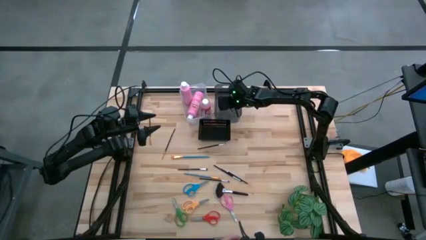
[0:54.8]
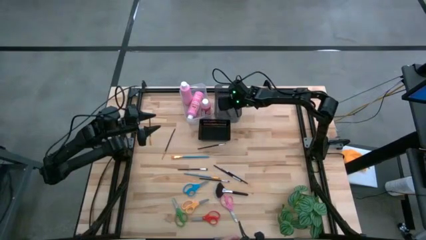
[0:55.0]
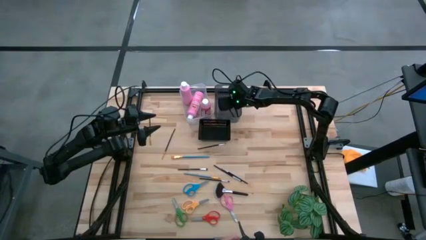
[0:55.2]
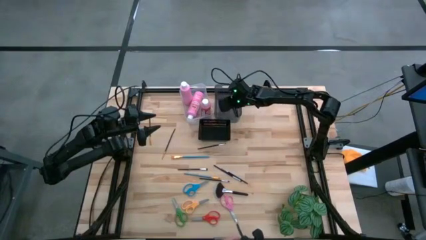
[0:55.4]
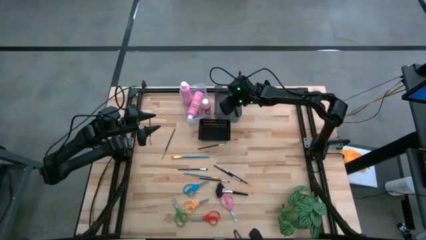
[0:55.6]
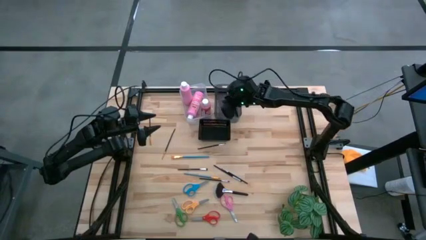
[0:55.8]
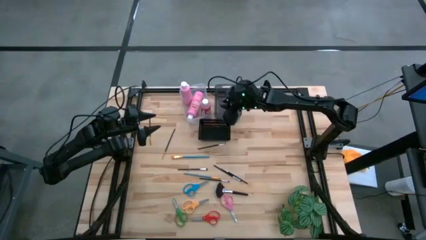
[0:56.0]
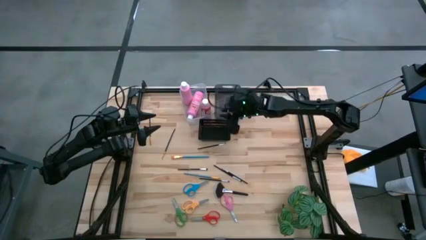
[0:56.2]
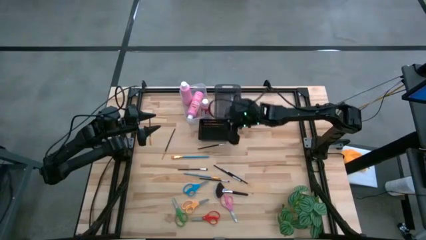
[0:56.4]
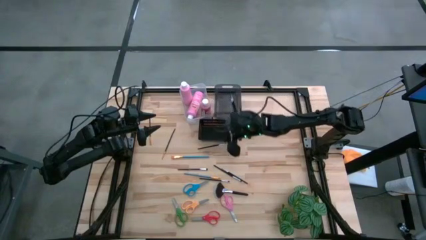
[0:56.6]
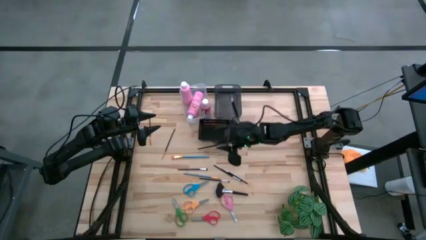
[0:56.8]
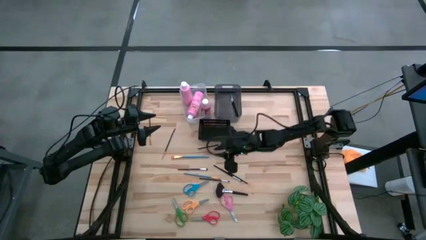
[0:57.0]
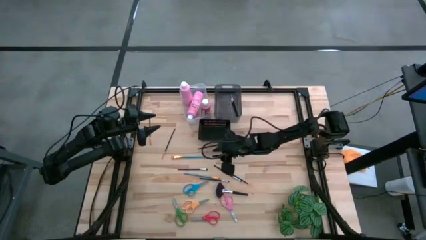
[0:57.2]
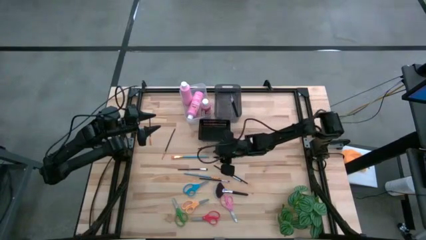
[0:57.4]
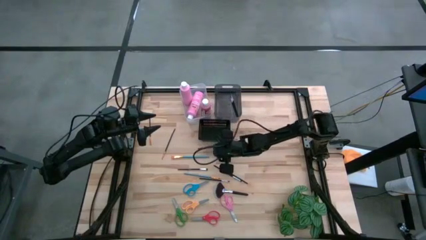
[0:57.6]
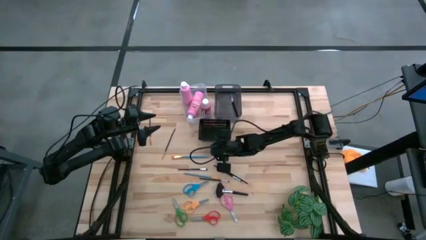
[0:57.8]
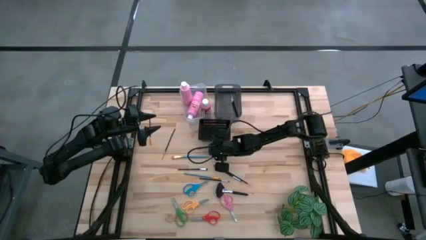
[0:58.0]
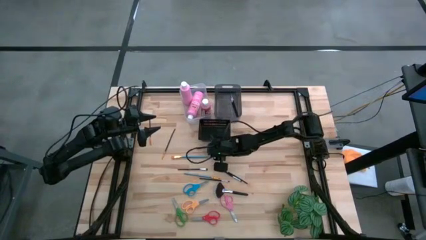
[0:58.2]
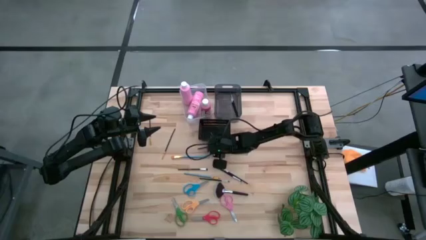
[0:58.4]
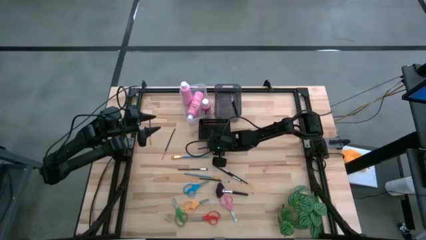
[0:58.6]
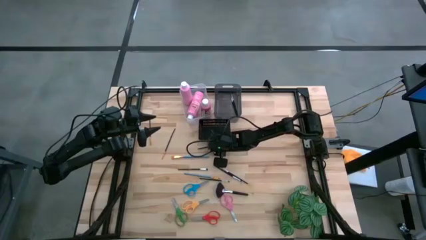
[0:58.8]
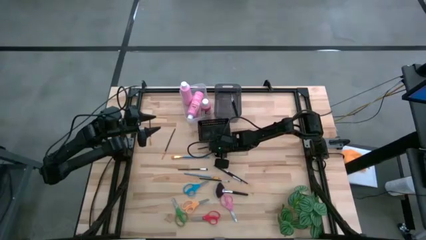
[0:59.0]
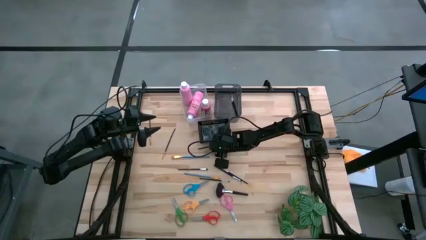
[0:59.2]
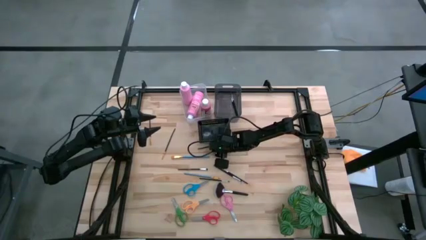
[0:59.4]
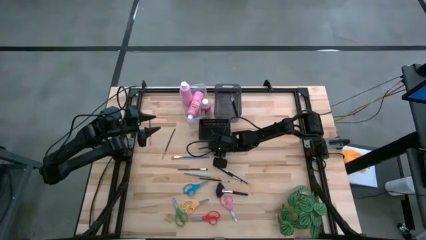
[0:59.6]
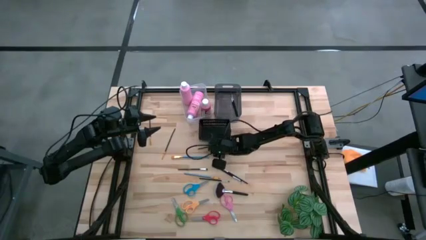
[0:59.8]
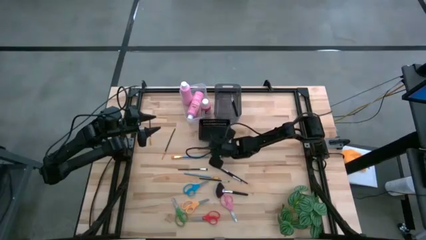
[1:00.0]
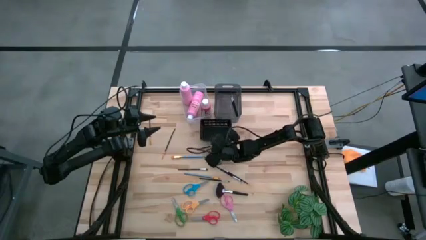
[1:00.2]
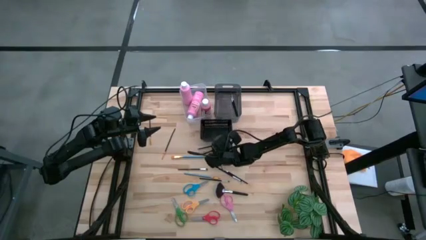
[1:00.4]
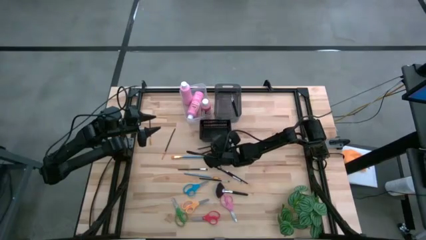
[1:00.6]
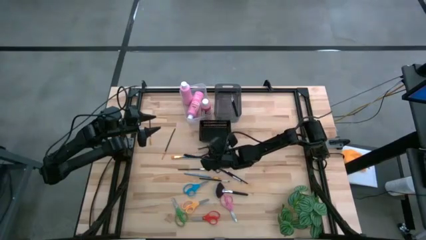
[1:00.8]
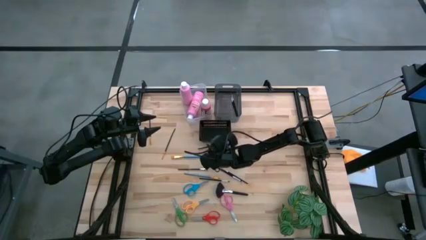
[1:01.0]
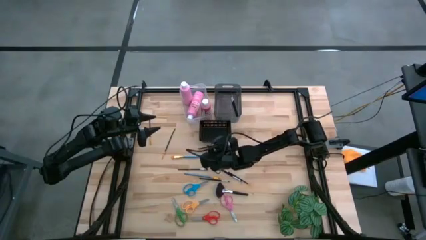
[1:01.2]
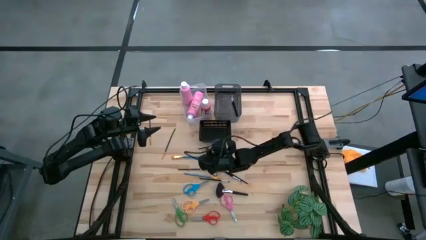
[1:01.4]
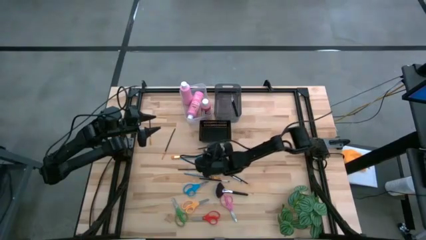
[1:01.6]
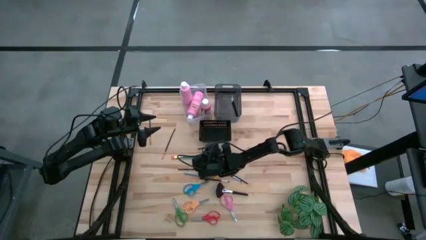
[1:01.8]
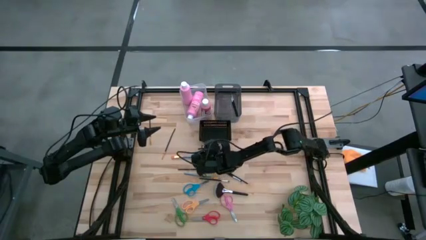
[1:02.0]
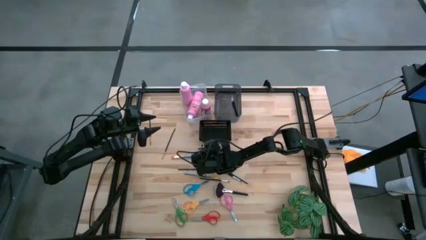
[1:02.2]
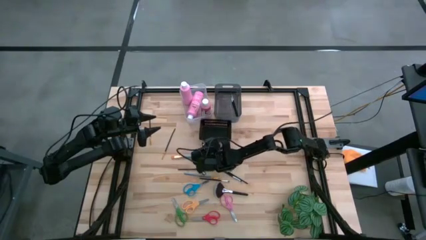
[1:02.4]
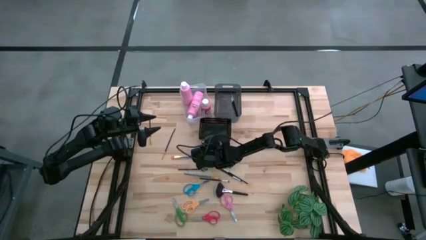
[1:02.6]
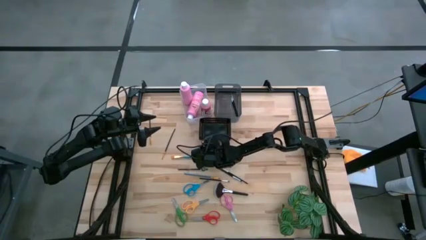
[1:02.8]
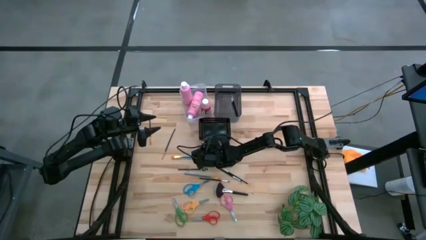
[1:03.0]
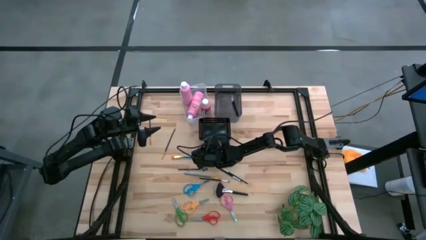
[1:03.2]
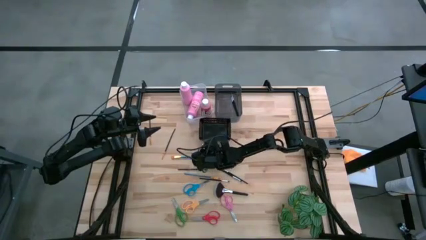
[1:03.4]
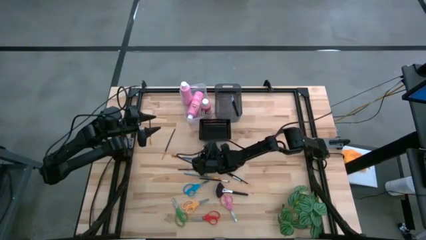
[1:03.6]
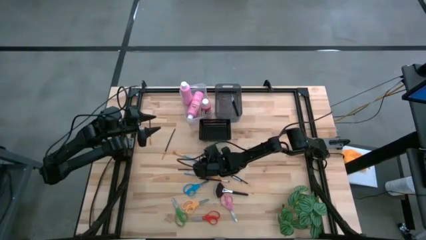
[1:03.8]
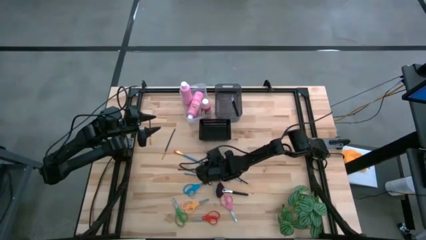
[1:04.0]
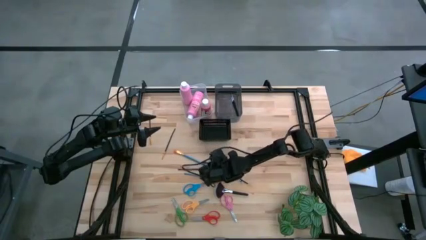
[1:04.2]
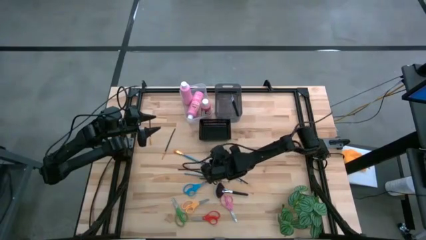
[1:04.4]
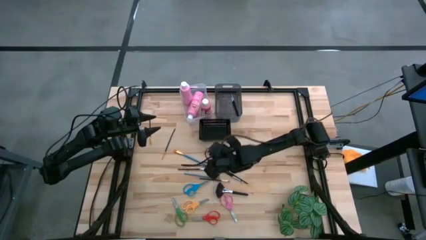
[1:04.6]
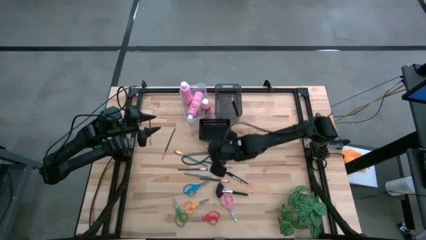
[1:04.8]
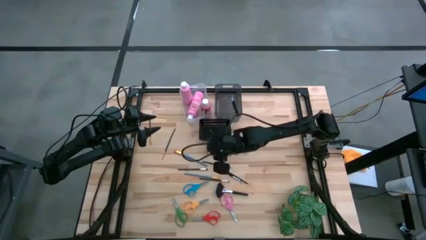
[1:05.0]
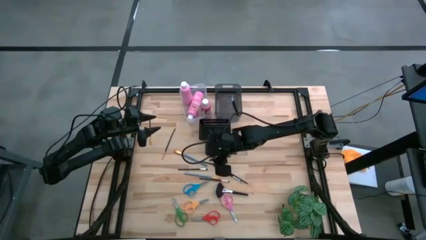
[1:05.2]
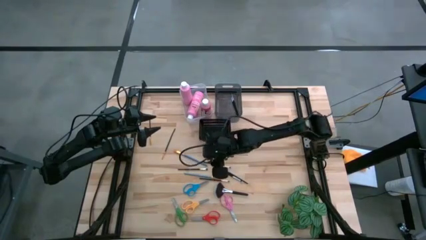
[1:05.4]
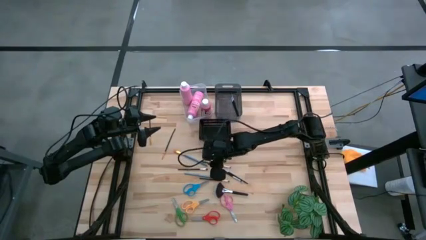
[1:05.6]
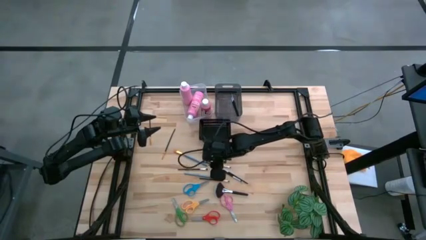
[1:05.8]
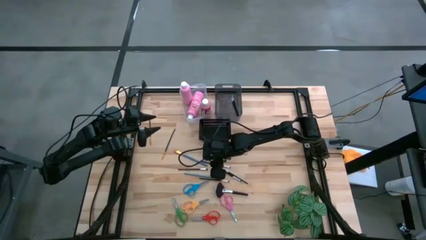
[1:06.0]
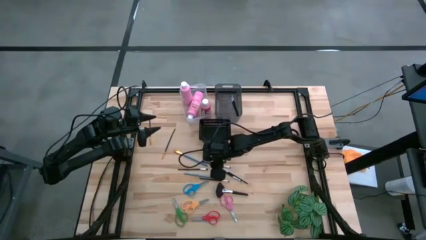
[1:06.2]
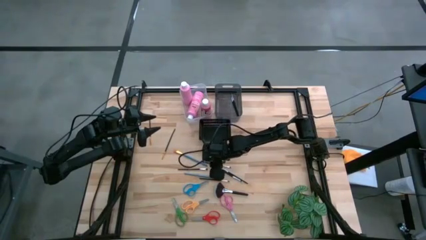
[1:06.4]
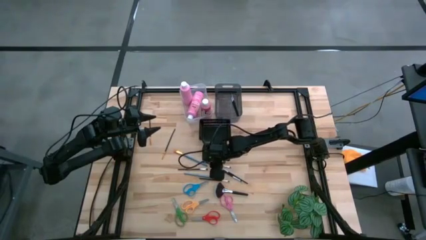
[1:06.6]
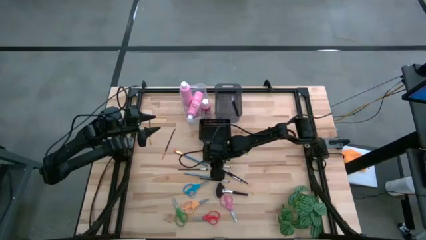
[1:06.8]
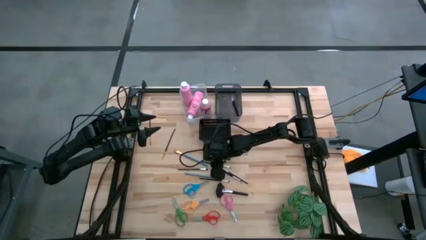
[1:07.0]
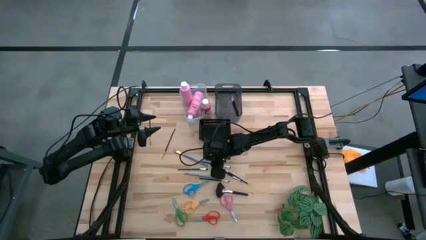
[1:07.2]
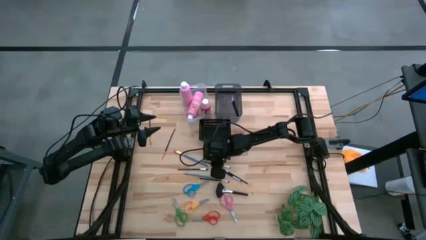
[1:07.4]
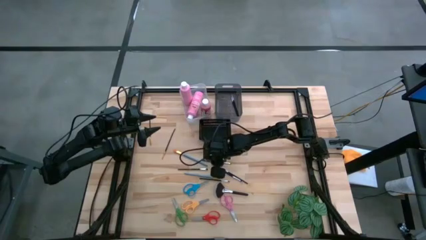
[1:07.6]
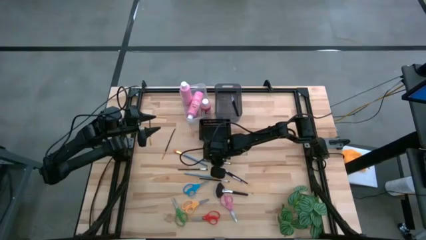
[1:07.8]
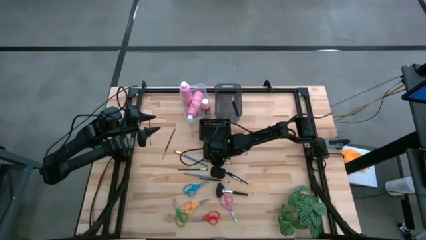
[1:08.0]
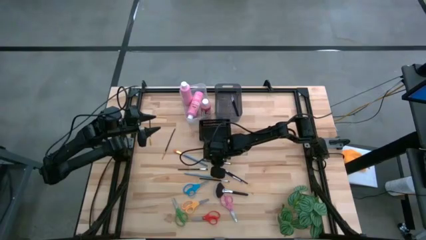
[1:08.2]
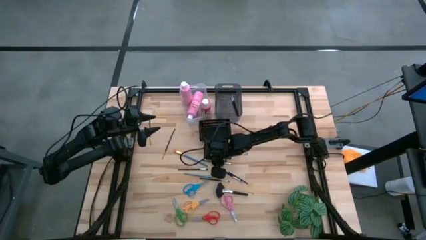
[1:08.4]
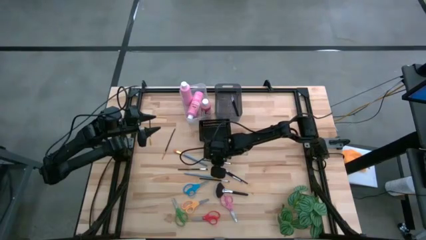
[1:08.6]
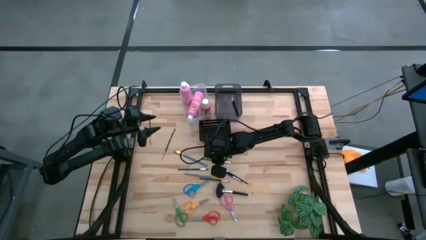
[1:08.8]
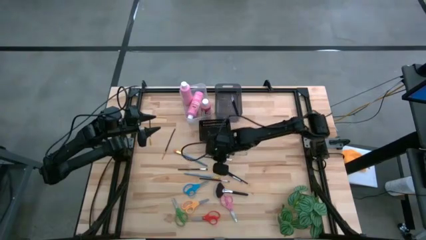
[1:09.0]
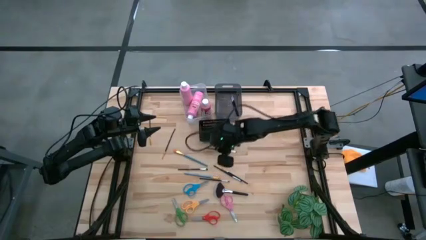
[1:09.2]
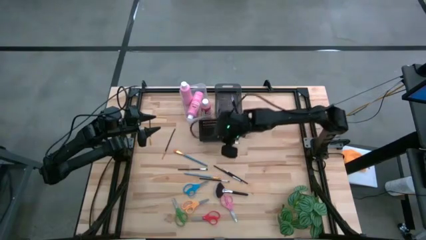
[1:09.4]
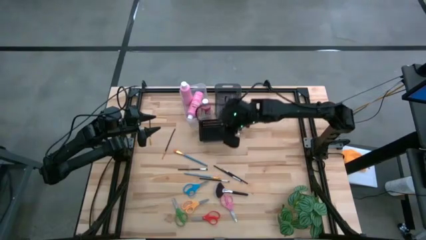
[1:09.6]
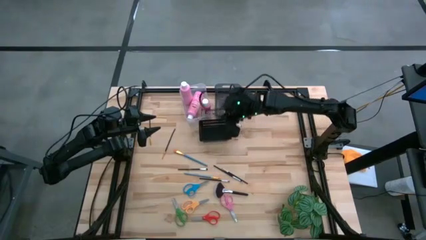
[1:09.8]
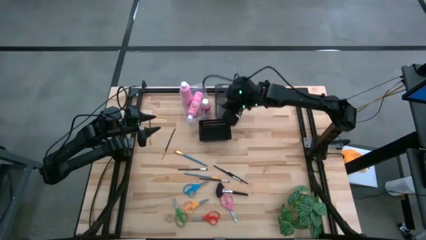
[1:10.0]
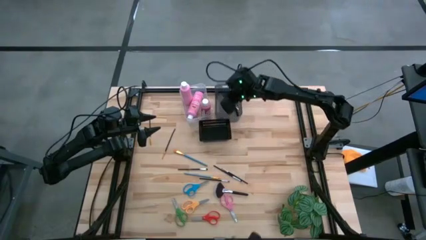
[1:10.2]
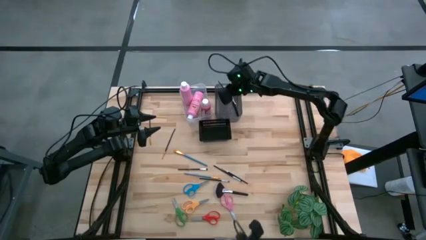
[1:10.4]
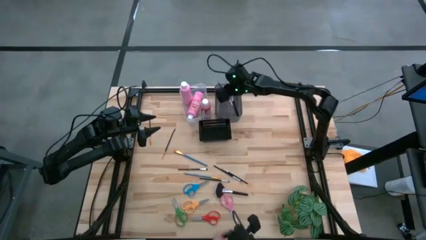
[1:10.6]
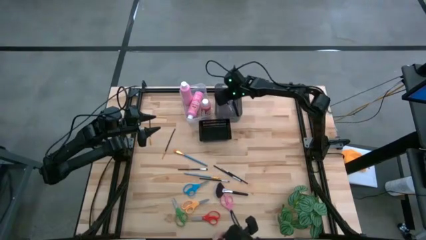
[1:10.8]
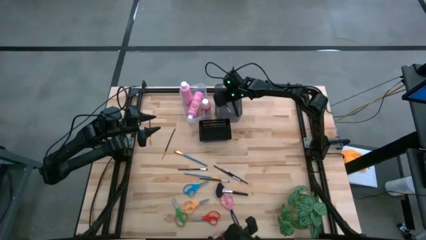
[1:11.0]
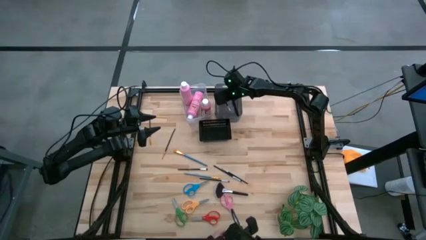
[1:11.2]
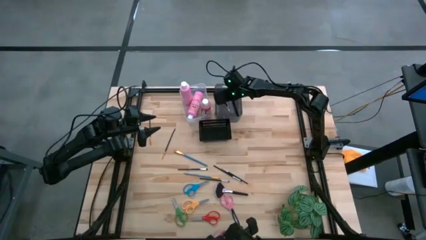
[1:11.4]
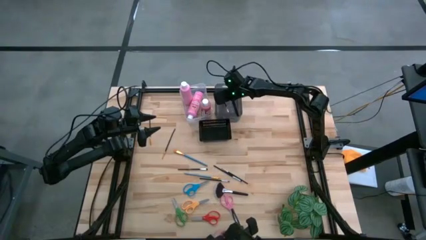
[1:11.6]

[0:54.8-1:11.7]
Task: Pick & Place Paint Supplies
Put the black paint brush into the gray bin
